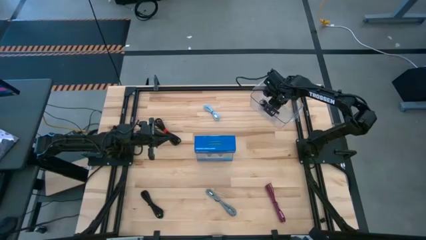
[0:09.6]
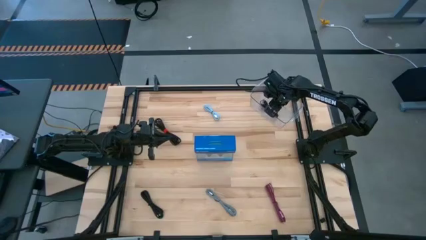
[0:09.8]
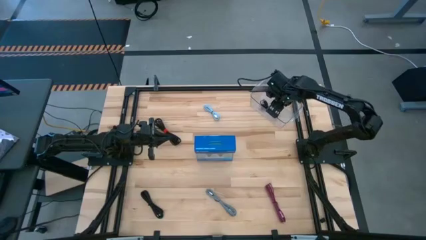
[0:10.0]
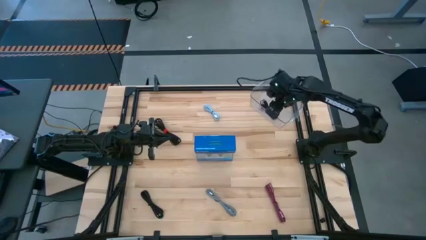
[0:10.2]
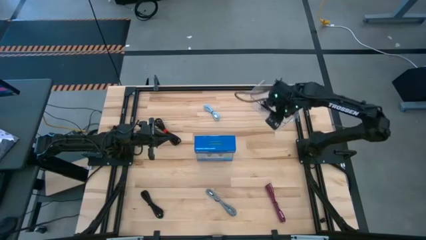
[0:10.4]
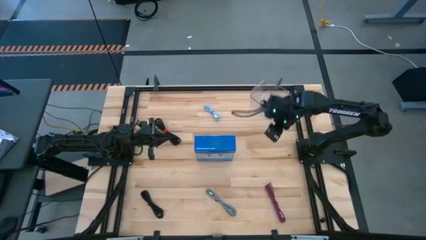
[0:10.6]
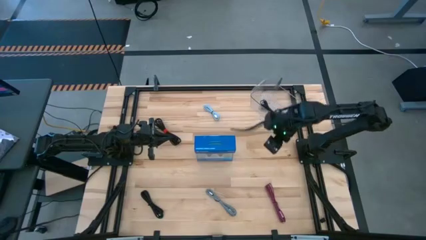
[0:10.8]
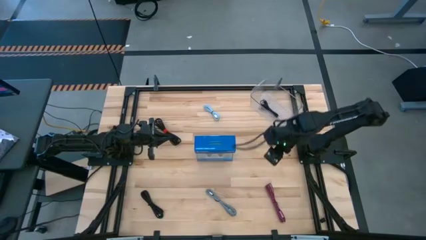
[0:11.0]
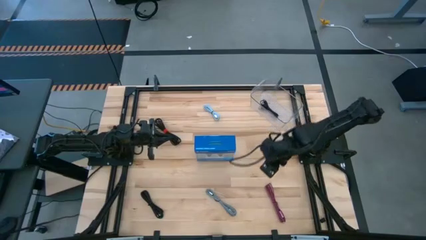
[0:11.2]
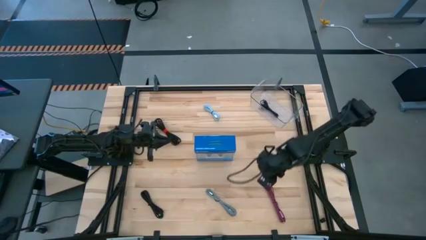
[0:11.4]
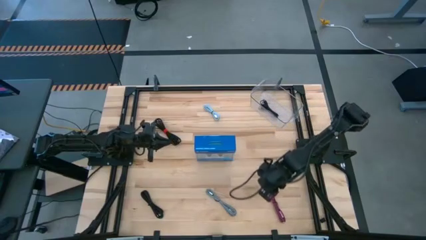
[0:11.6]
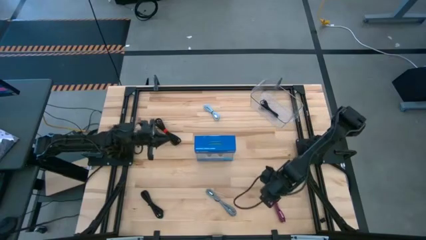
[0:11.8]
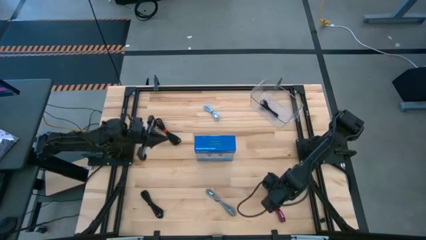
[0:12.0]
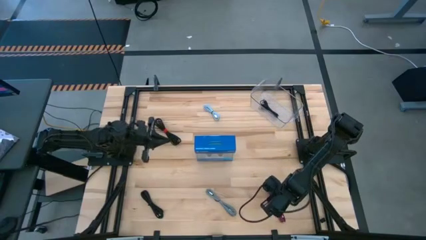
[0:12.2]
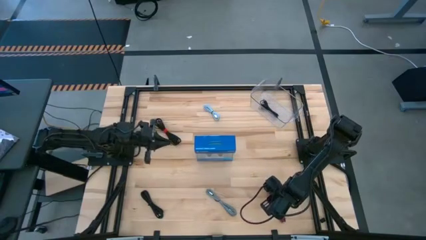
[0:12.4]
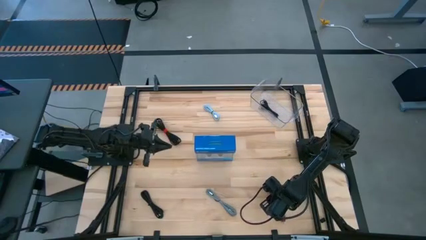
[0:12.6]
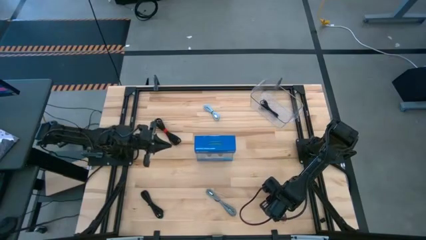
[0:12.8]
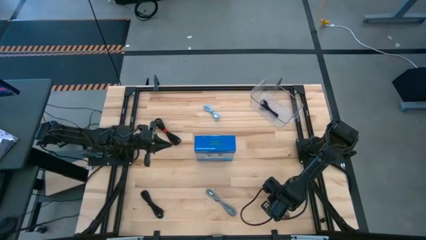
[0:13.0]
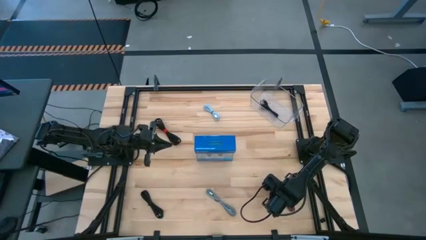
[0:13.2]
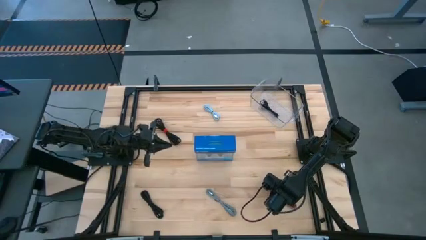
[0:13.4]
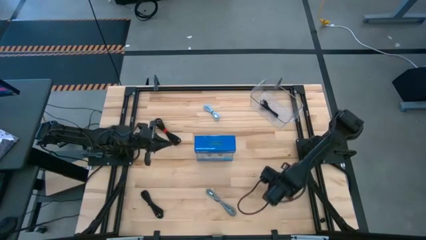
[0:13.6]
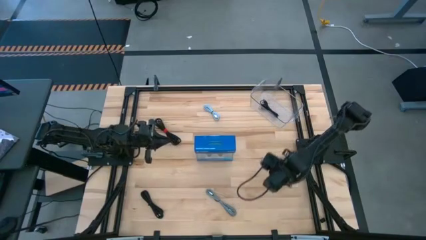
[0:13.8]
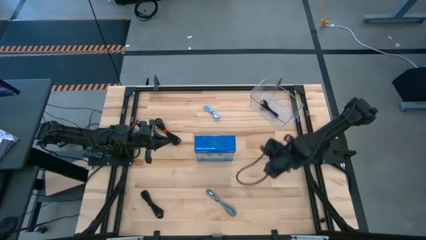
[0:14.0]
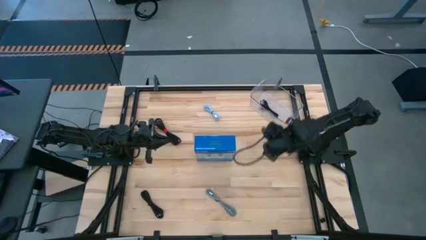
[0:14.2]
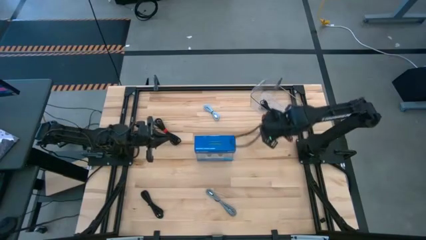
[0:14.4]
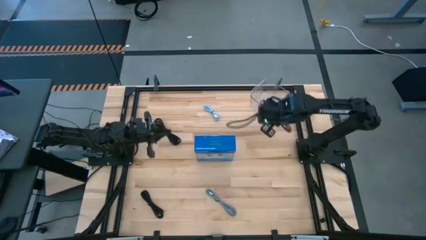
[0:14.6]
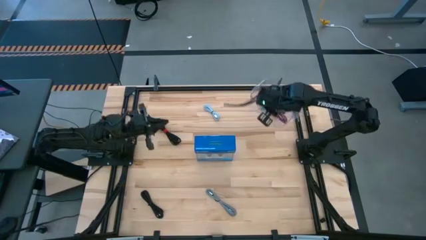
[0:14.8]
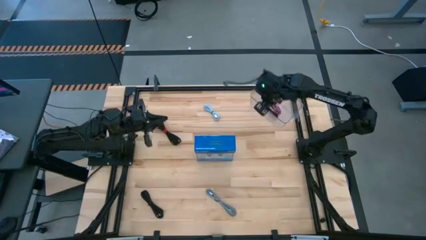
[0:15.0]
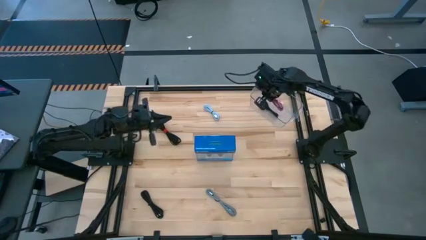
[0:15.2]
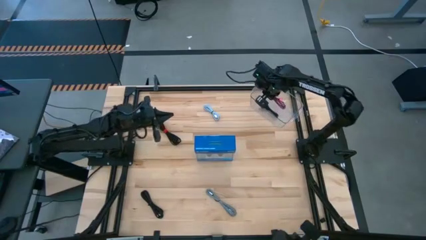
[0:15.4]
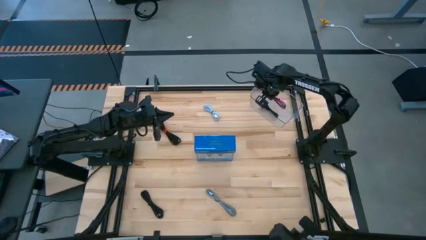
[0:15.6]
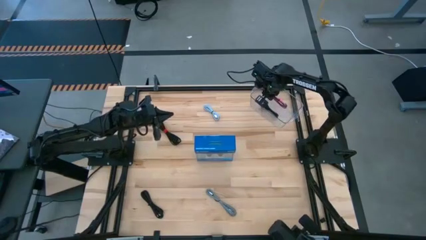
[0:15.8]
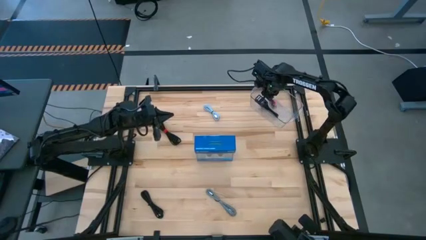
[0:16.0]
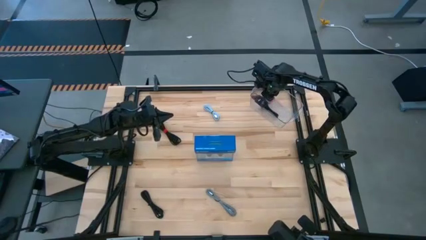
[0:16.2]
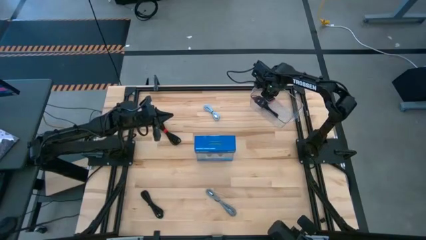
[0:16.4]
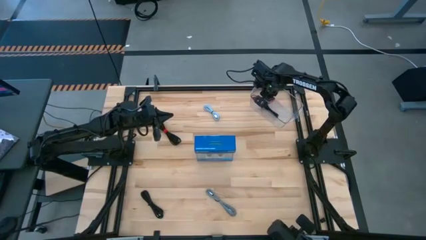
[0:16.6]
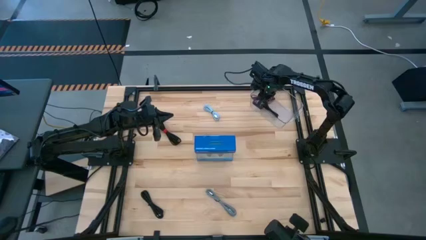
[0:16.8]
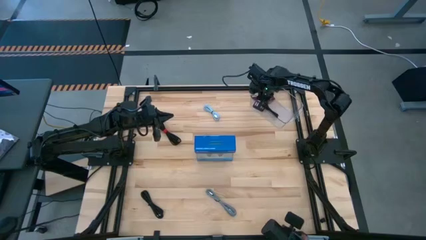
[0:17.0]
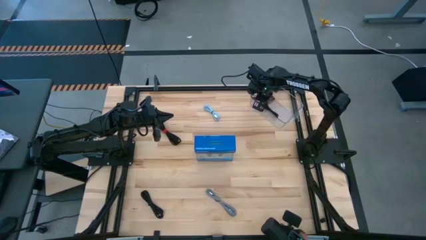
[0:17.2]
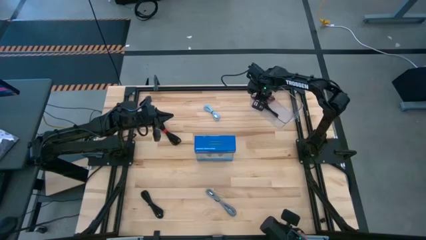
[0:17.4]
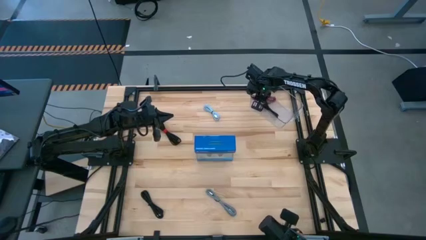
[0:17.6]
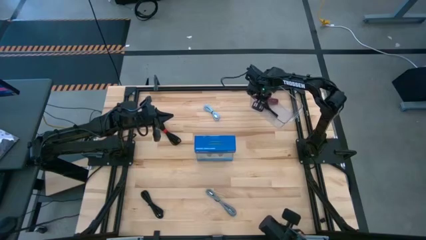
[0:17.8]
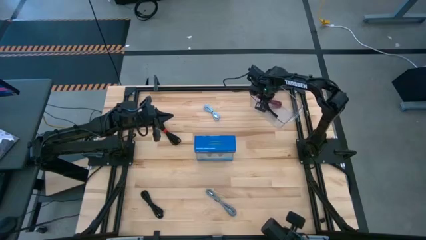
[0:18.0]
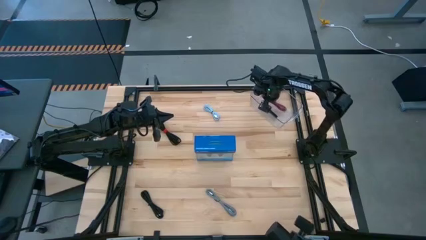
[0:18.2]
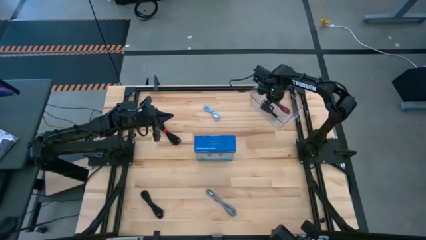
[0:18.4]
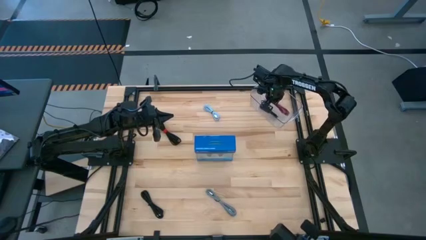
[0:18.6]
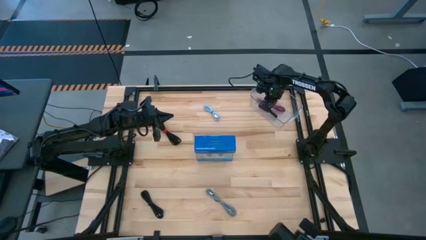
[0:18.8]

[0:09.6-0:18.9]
Task: Pick and place USB-C Cables
Put the pink charger cable into the container

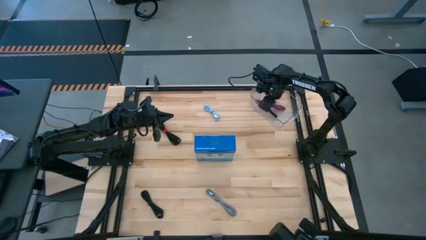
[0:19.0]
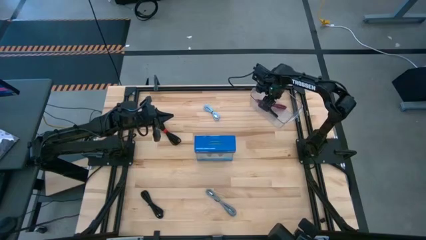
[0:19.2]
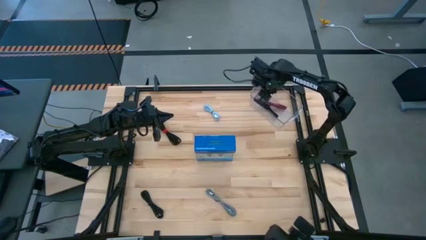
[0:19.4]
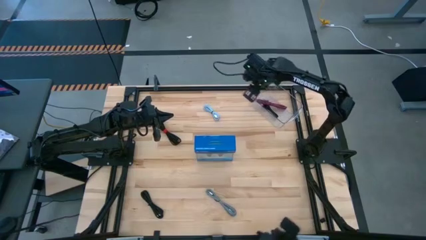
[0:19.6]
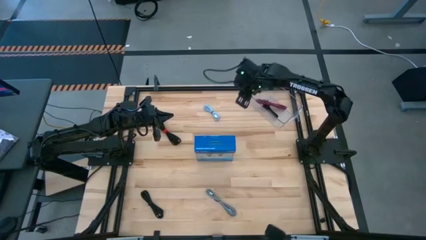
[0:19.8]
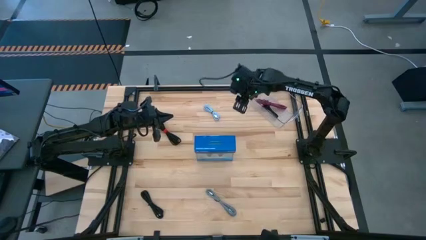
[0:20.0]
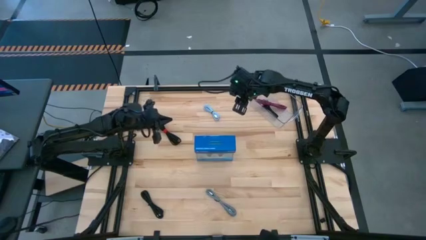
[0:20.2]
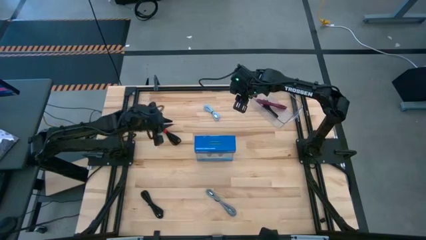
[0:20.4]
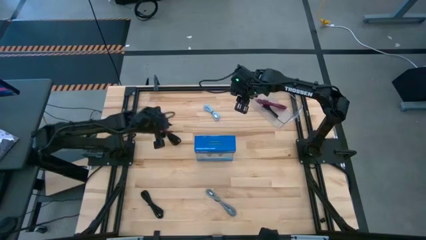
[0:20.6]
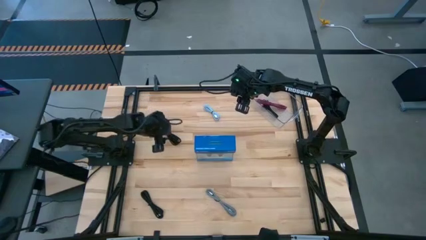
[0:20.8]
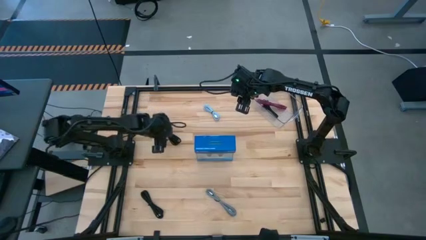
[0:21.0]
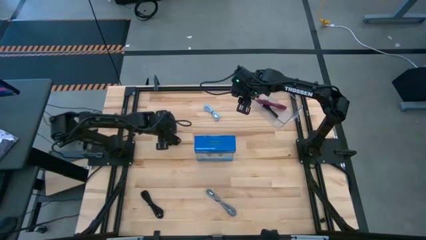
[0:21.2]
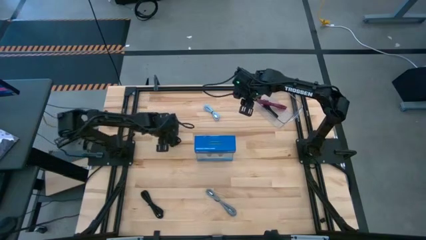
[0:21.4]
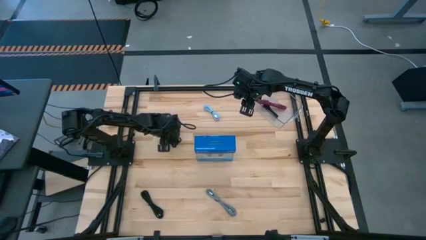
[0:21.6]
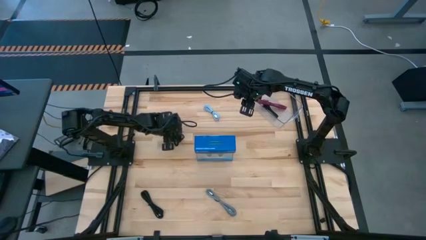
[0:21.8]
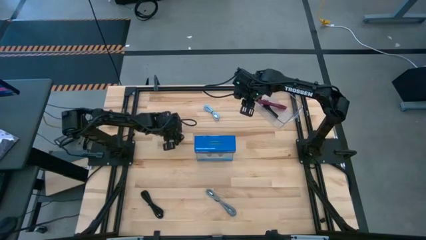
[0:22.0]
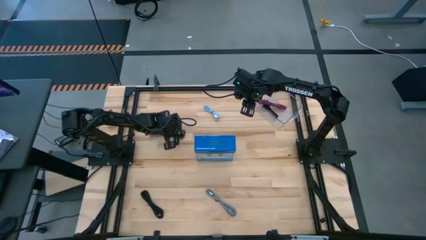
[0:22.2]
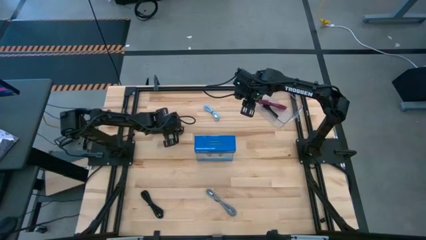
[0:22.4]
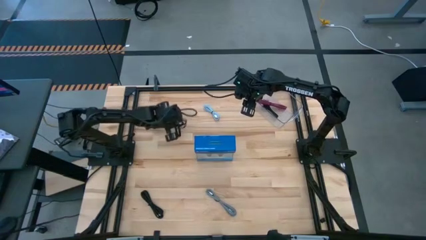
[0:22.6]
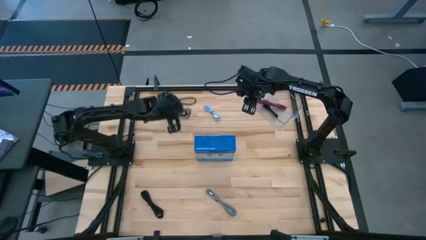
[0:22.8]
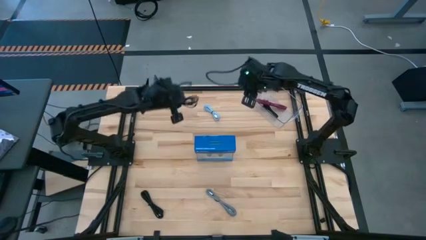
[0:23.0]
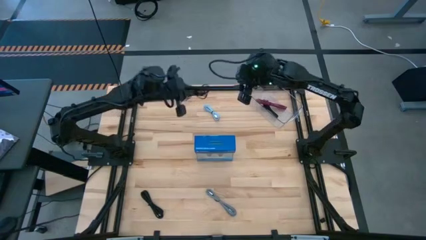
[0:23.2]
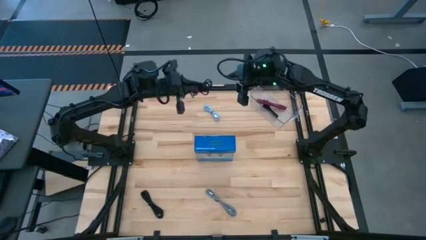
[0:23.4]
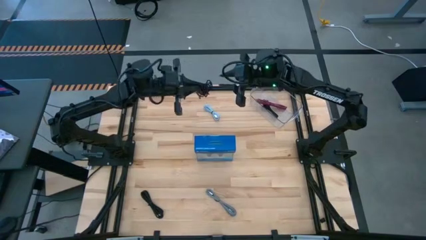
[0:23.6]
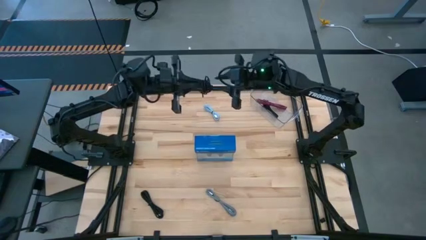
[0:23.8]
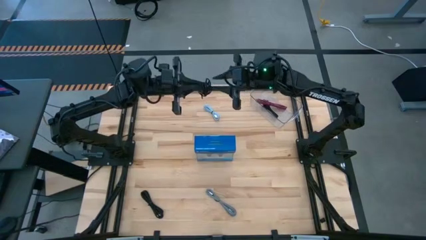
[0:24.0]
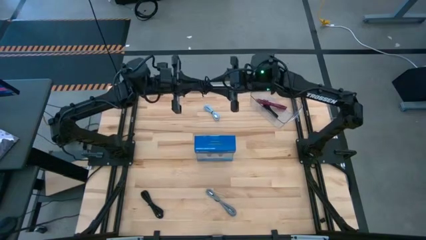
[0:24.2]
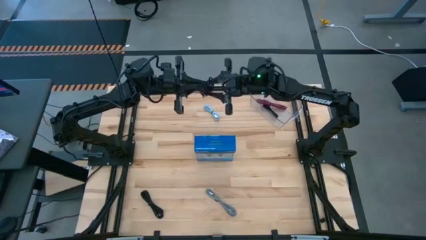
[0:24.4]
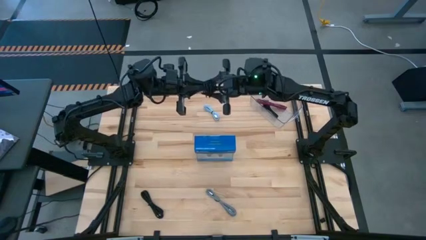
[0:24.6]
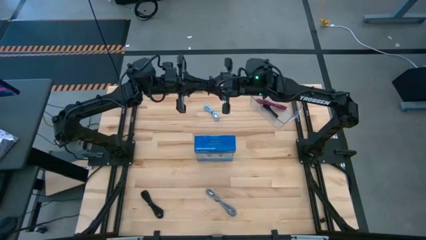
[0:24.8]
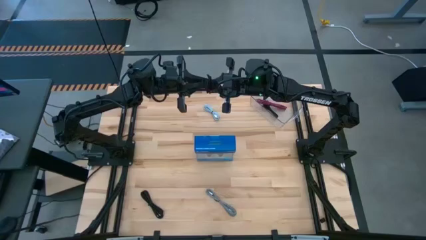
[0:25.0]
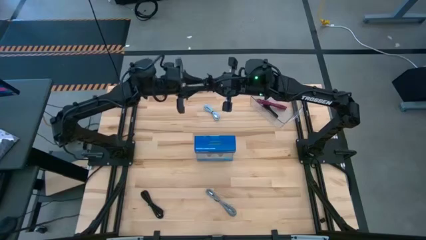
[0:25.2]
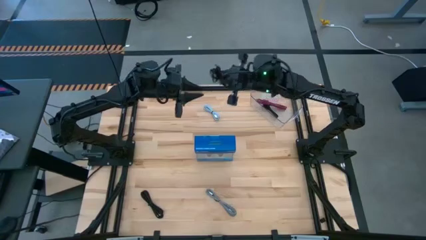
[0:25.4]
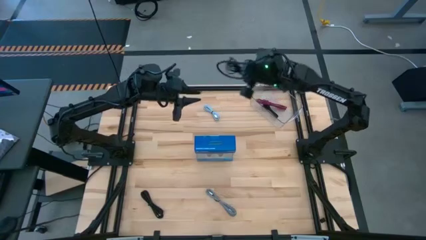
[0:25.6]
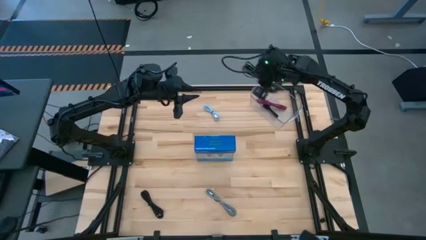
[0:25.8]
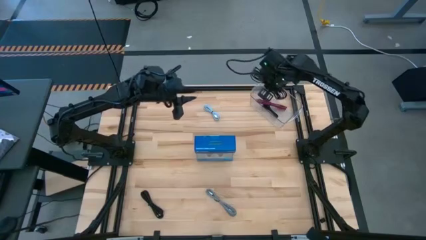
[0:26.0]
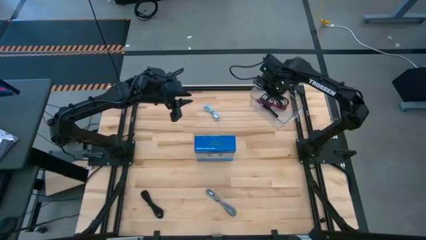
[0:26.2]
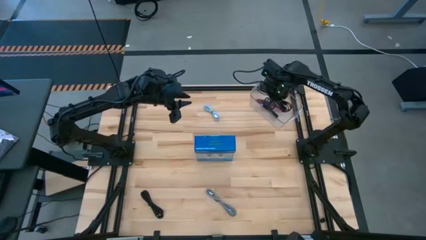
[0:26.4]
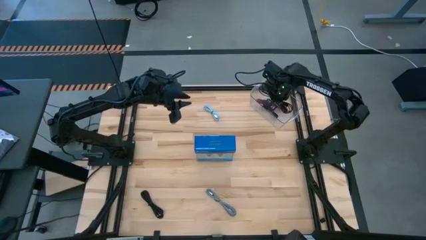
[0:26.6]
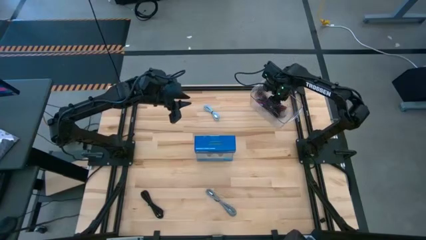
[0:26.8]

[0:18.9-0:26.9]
Put the top black charger cable into the container
